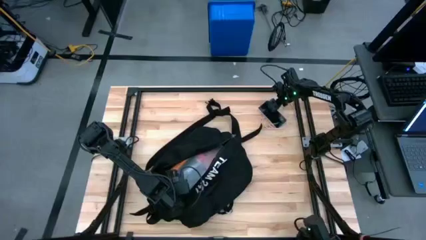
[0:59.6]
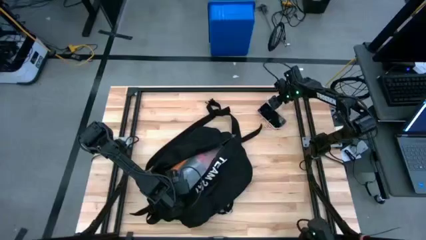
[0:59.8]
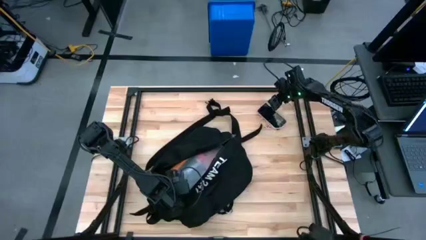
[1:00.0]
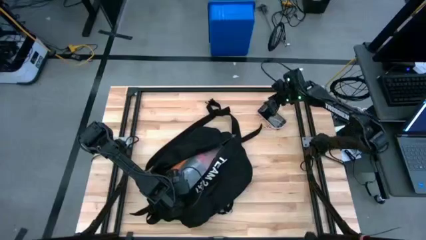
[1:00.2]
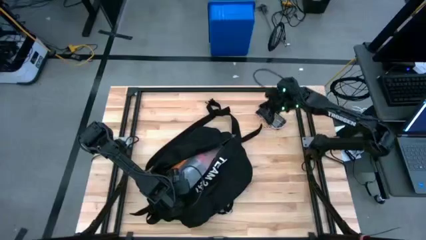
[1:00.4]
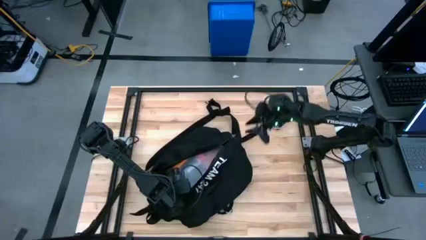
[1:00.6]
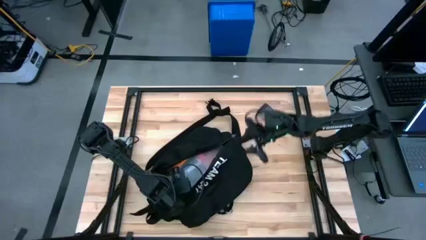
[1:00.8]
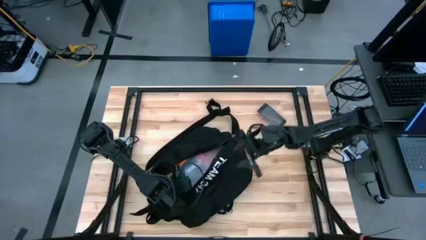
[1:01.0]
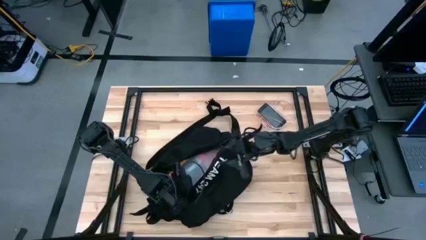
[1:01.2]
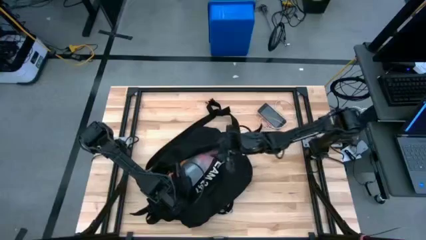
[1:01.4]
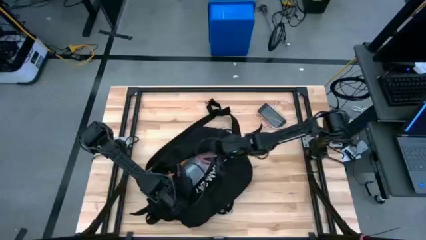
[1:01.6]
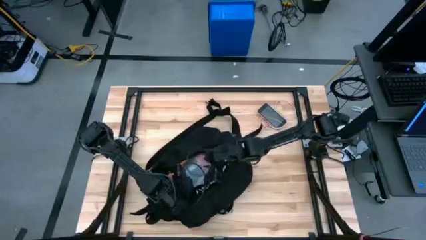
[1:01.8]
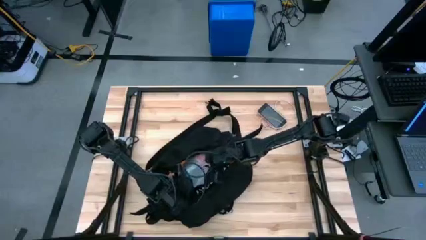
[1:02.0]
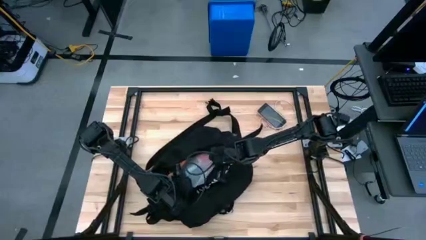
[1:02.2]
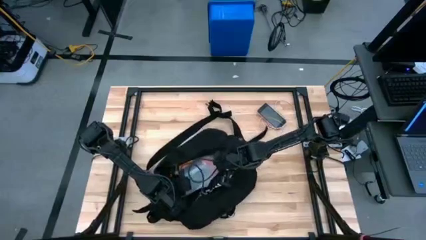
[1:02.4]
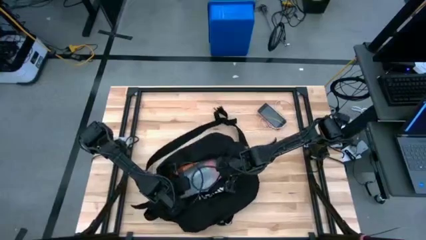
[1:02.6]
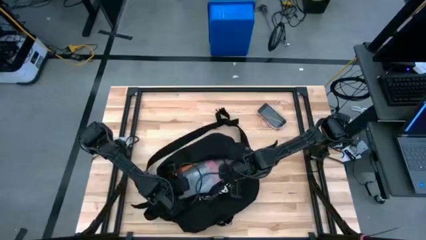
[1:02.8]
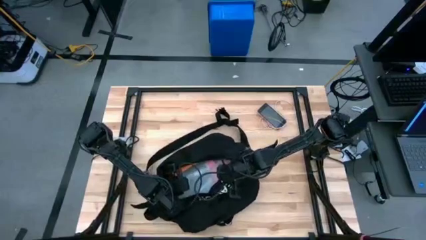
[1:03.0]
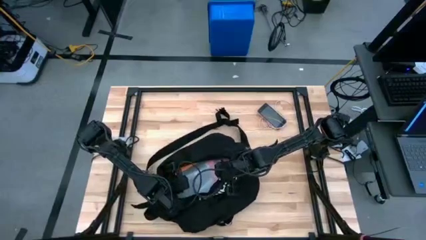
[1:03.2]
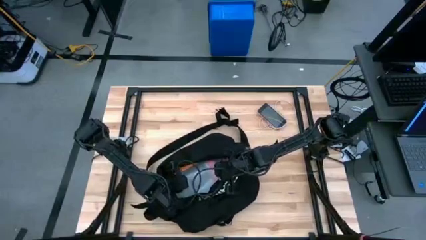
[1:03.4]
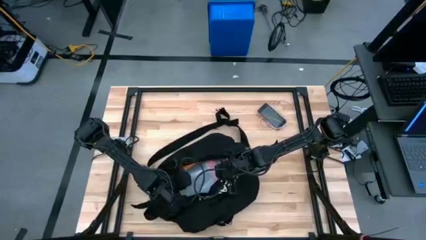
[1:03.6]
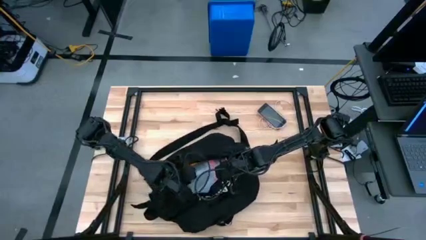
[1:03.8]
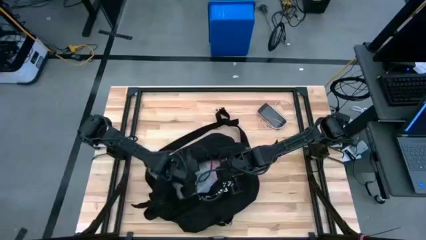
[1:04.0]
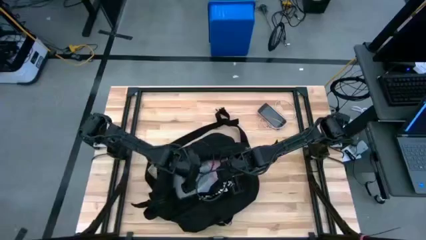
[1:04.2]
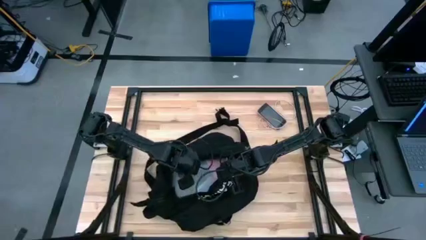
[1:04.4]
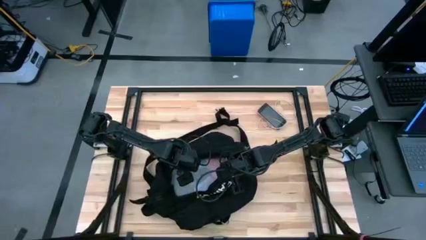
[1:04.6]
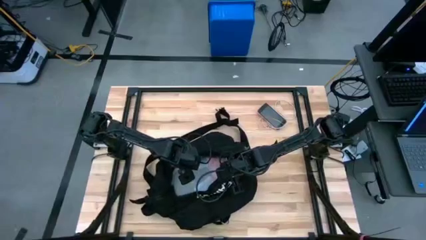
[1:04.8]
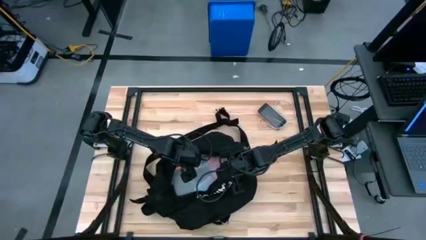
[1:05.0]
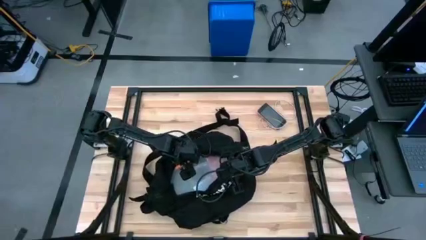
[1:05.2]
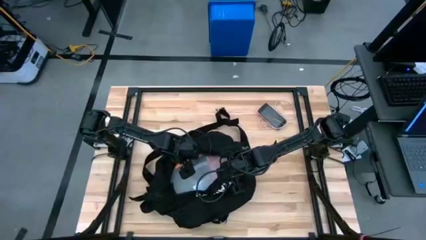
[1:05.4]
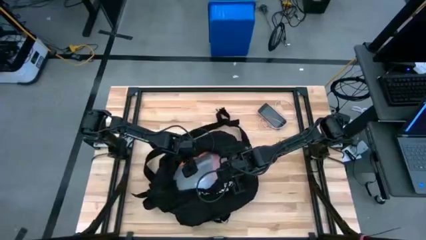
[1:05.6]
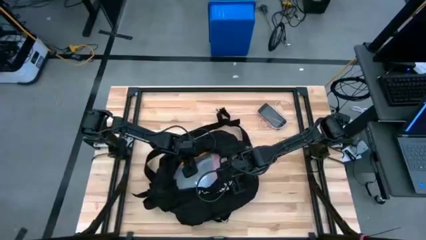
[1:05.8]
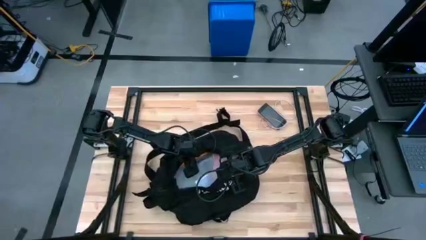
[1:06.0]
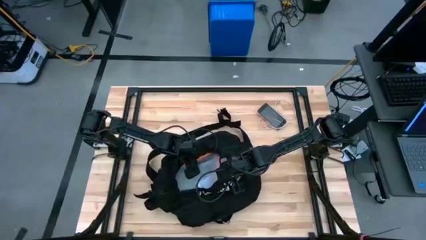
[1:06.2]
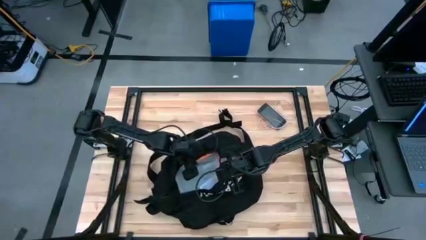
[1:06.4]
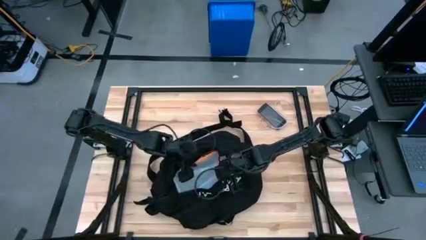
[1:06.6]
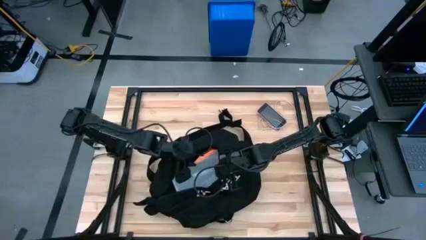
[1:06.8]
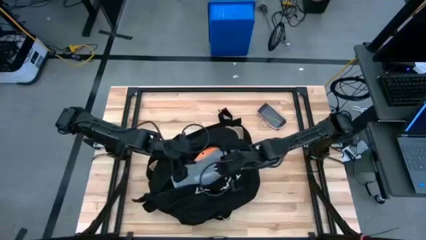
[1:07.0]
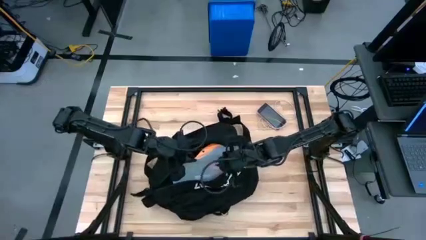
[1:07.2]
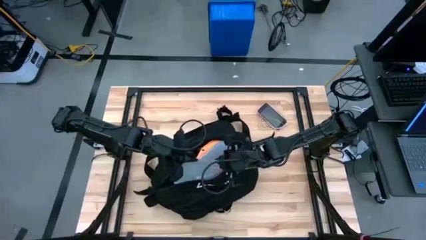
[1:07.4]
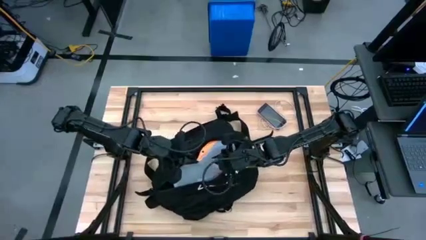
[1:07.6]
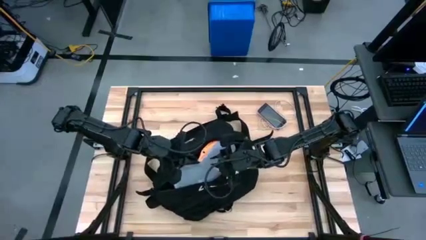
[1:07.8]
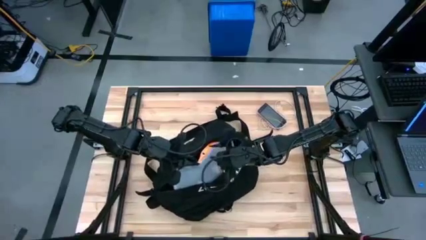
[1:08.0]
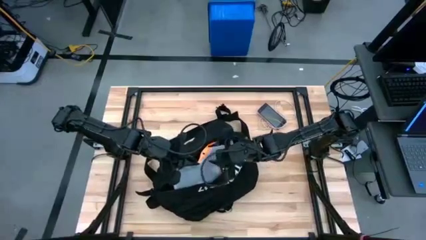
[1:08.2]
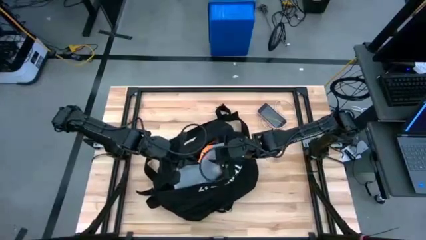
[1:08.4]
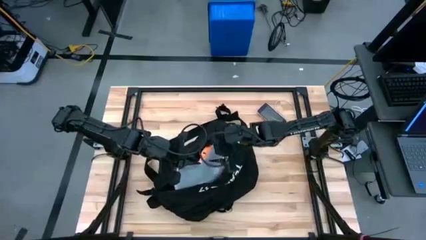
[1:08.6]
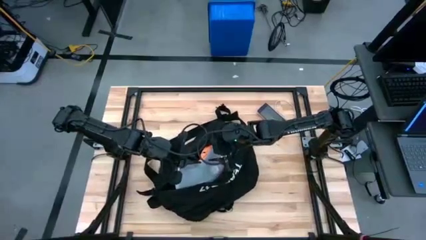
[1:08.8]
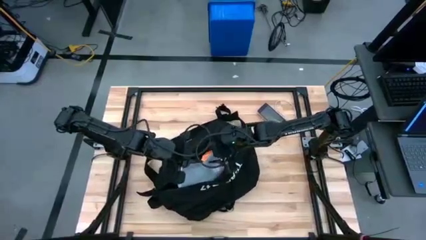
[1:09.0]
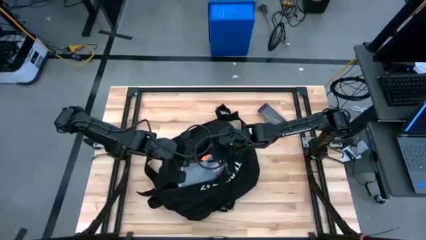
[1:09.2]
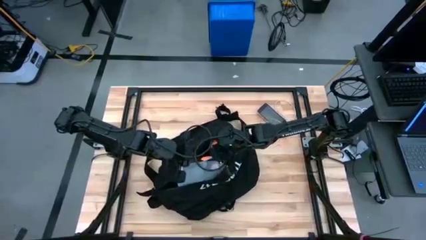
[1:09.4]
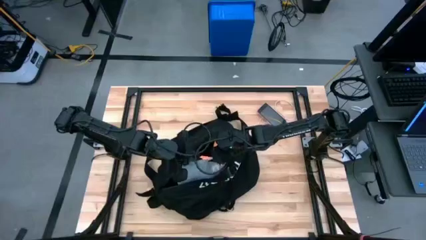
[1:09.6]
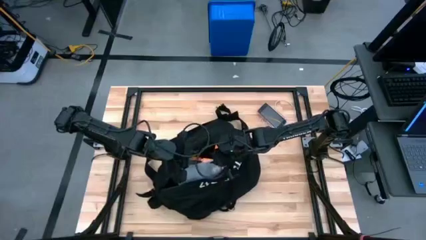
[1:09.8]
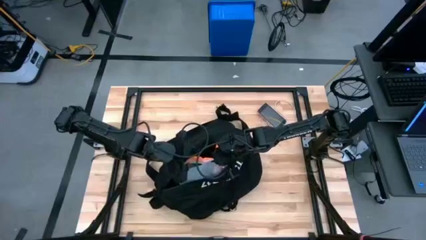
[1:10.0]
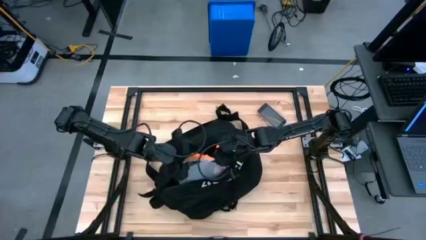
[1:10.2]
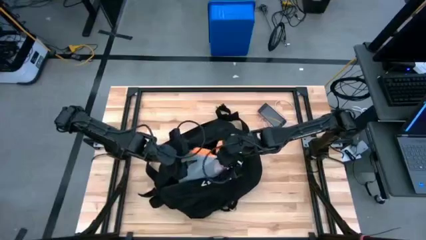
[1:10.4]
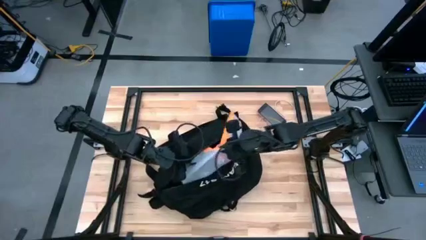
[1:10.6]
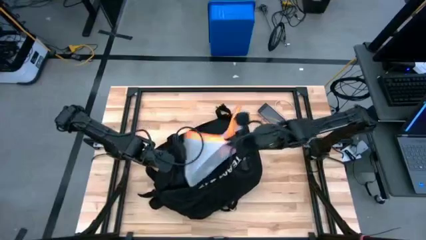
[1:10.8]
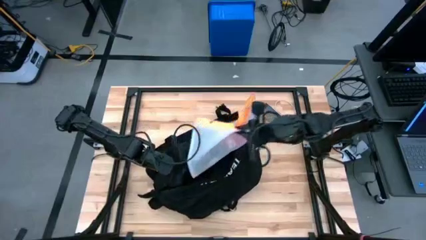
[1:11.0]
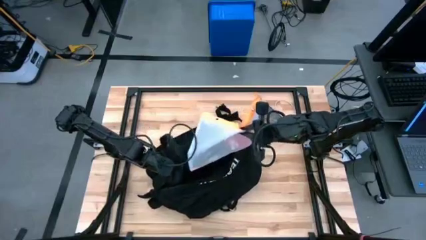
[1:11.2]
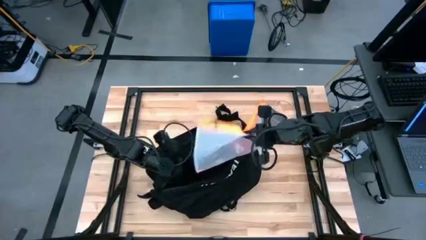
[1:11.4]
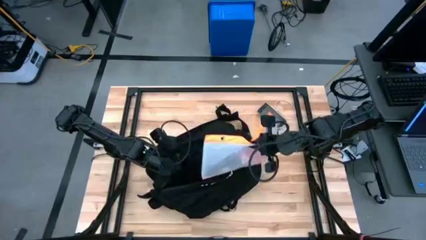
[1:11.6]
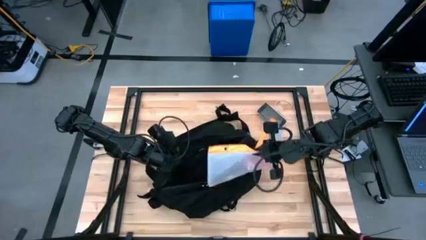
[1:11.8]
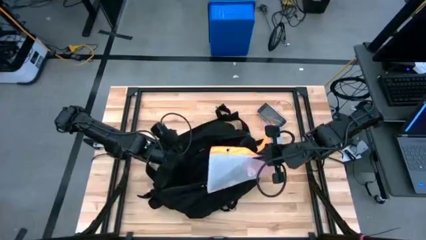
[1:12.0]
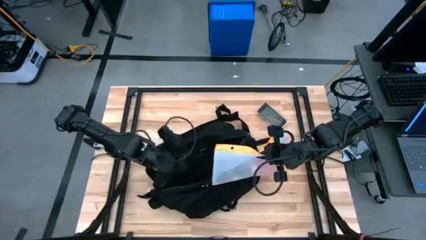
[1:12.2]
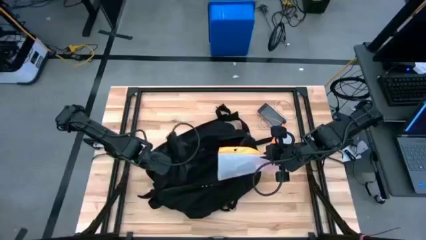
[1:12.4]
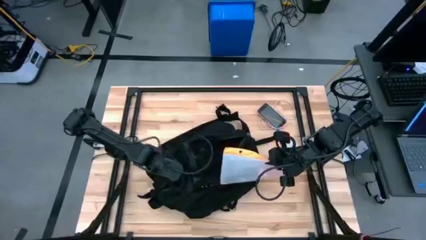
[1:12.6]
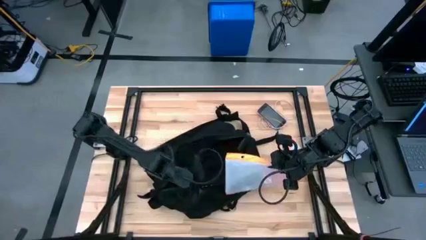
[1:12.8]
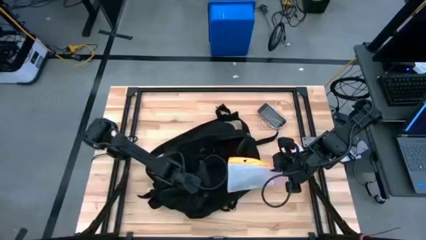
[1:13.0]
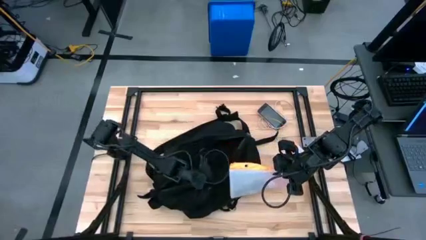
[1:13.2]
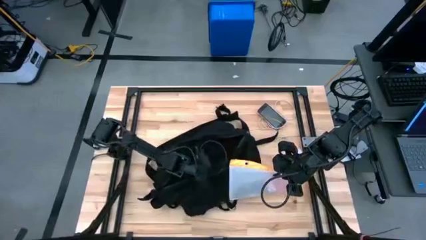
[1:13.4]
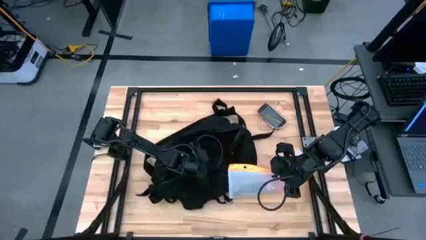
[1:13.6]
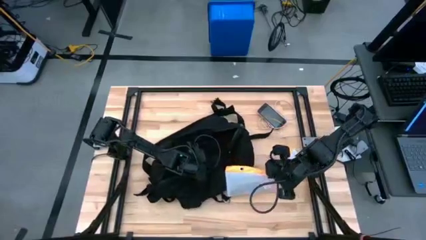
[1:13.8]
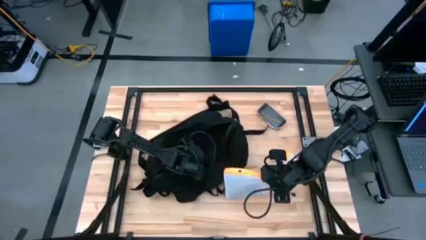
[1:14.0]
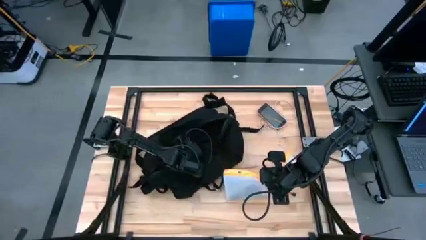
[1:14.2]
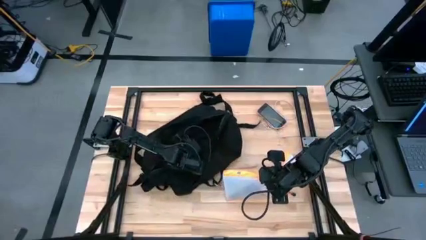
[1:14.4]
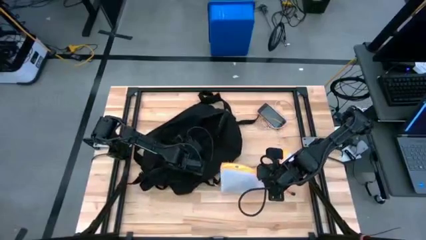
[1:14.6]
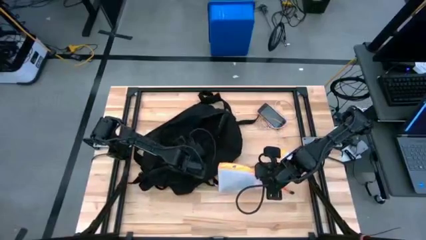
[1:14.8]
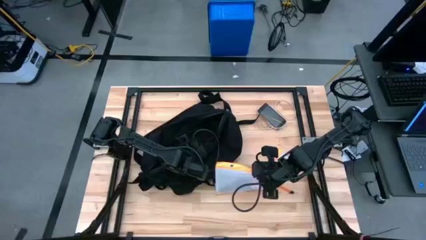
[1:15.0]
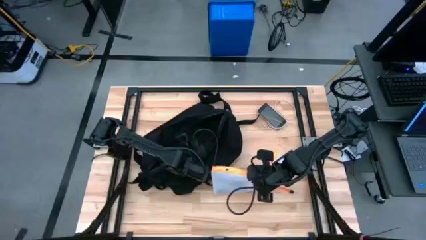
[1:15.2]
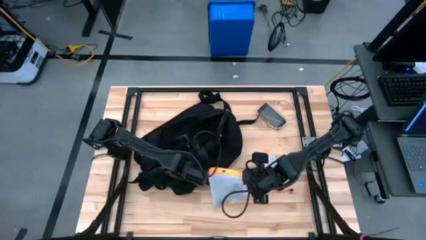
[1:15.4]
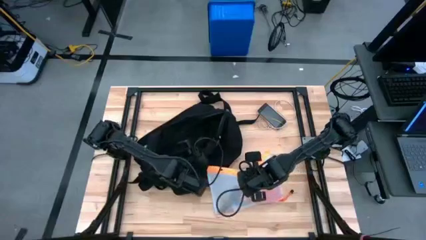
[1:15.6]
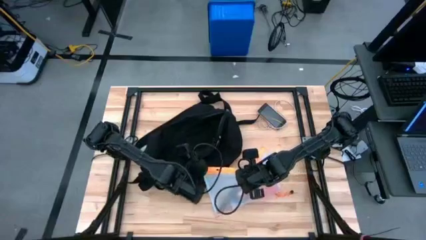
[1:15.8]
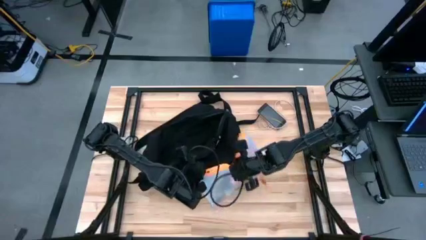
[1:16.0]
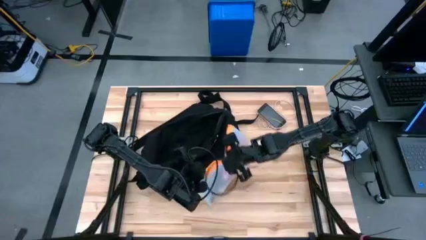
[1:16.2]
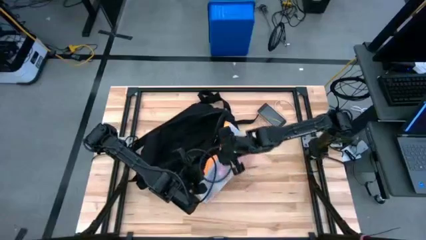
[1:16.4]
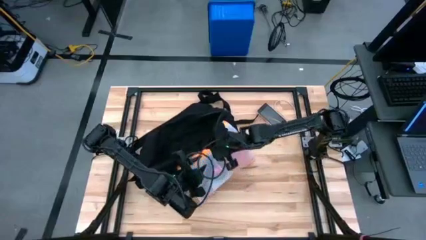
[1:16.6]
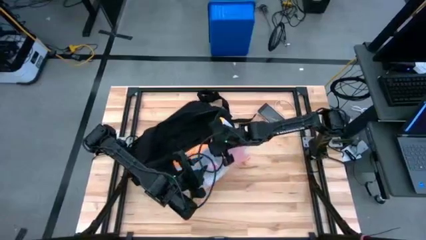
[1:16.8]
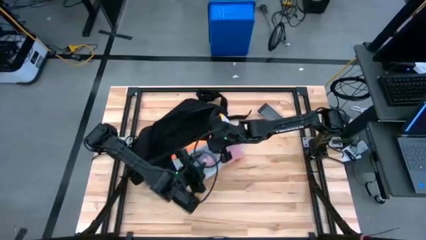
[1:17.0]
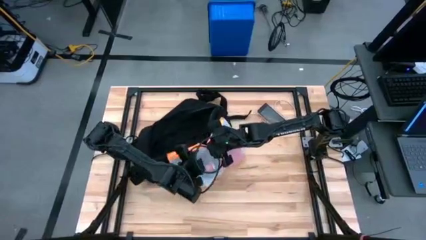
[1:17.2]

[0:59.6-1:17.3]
Task: Unpack backpack
Remove the orange zip bag from the black backpack
